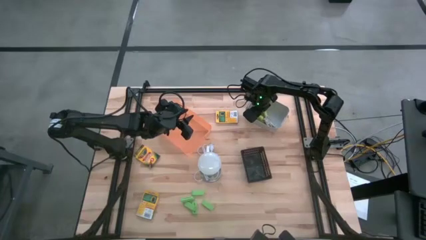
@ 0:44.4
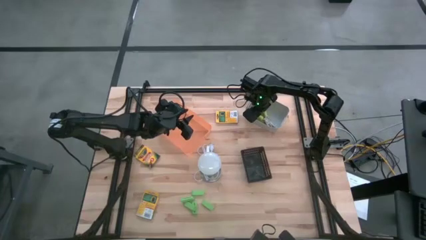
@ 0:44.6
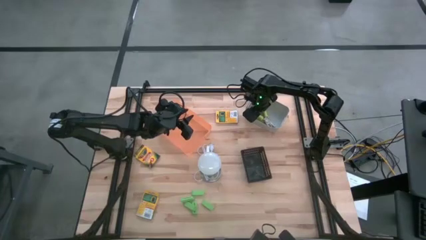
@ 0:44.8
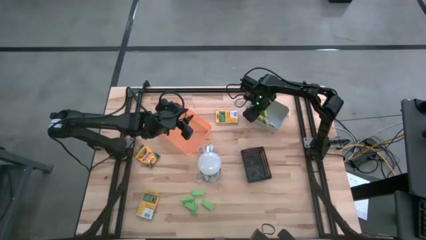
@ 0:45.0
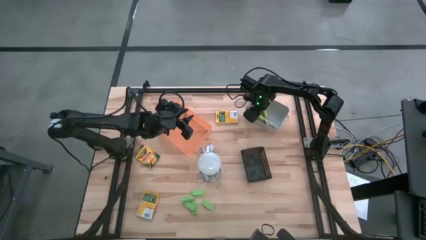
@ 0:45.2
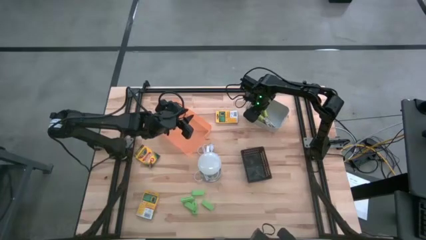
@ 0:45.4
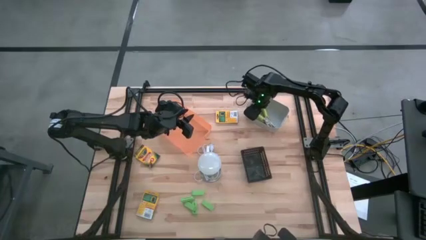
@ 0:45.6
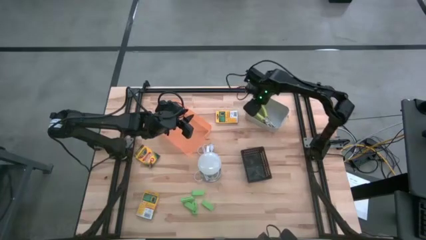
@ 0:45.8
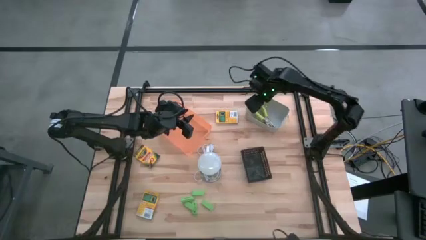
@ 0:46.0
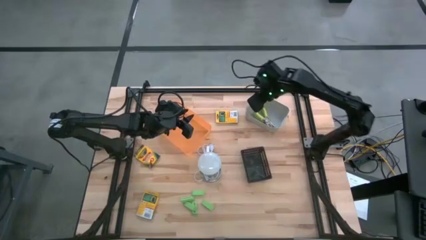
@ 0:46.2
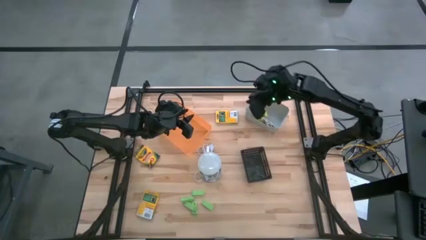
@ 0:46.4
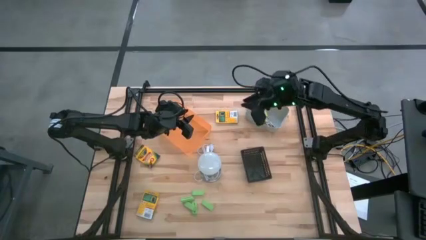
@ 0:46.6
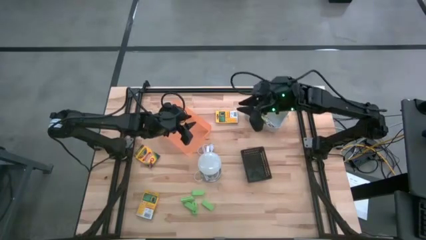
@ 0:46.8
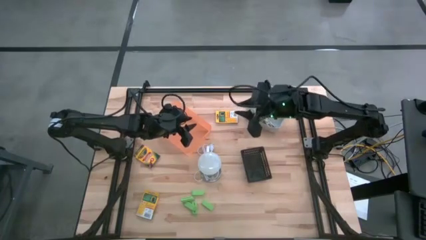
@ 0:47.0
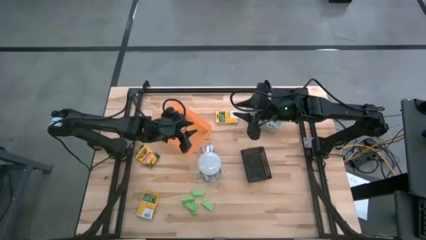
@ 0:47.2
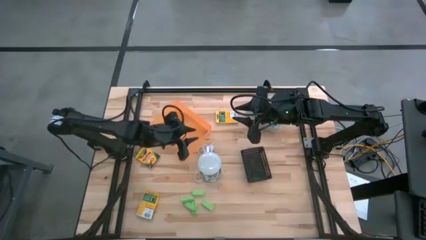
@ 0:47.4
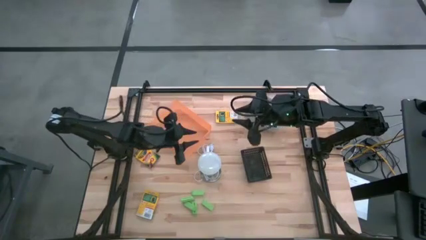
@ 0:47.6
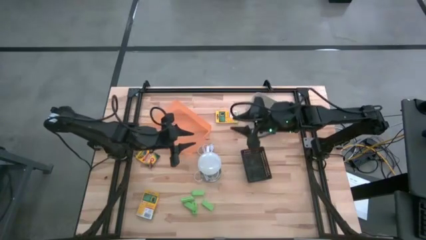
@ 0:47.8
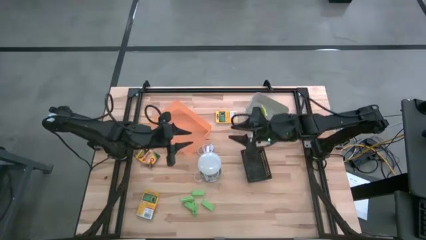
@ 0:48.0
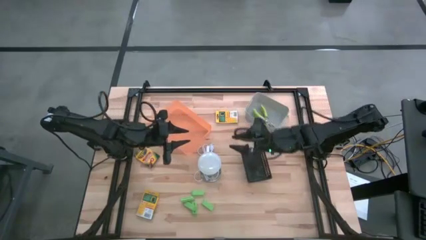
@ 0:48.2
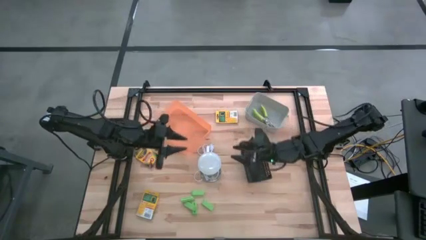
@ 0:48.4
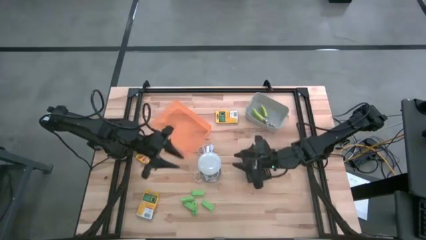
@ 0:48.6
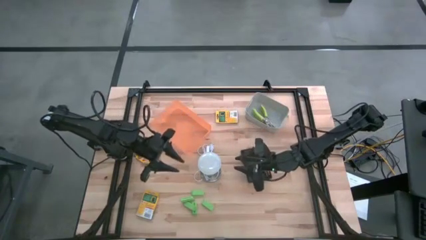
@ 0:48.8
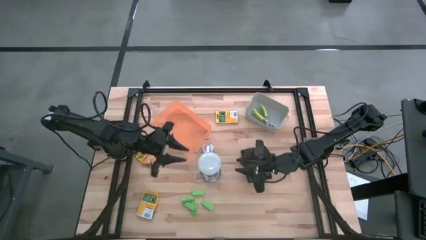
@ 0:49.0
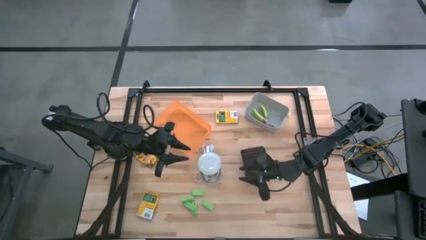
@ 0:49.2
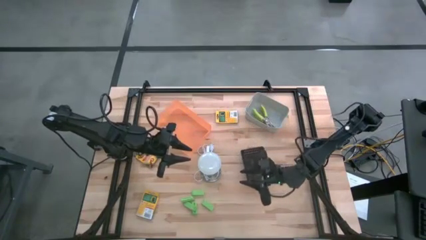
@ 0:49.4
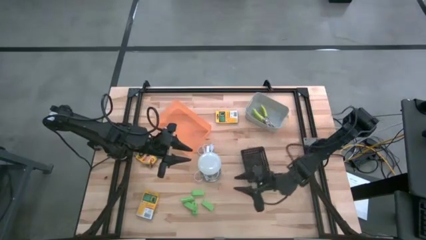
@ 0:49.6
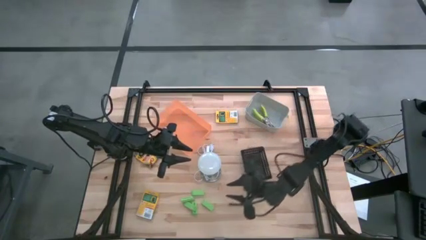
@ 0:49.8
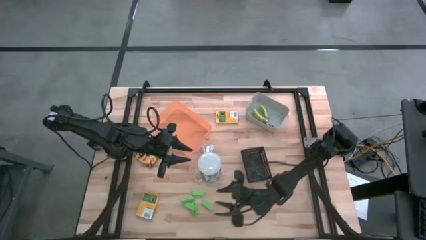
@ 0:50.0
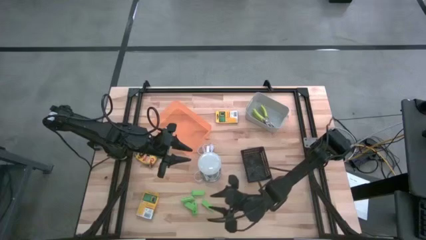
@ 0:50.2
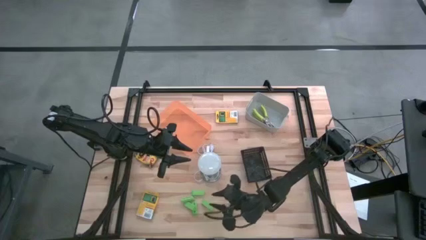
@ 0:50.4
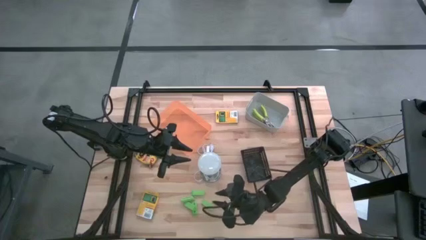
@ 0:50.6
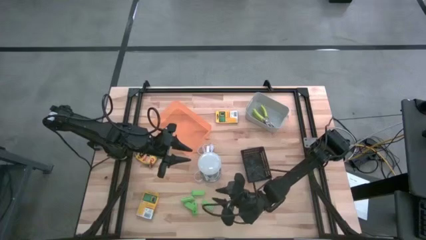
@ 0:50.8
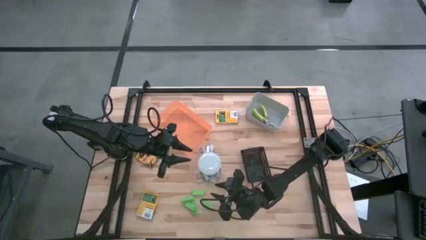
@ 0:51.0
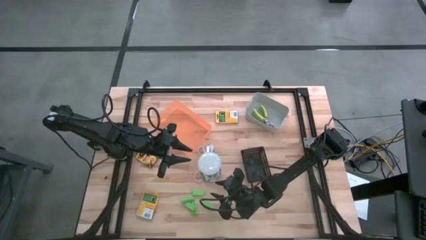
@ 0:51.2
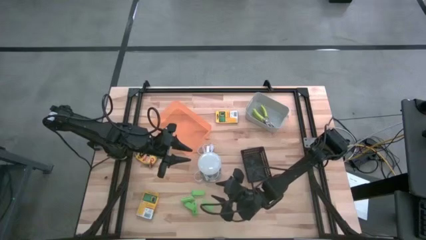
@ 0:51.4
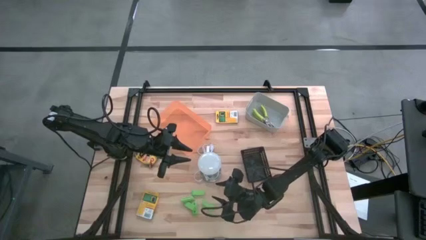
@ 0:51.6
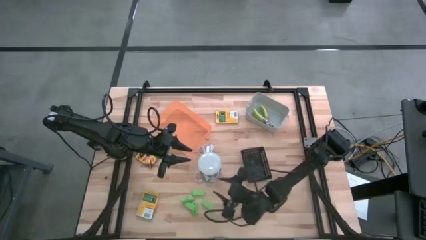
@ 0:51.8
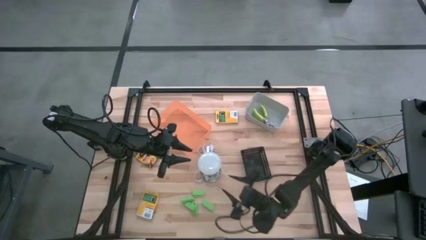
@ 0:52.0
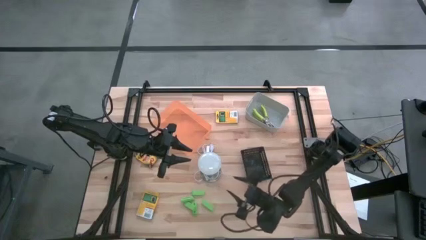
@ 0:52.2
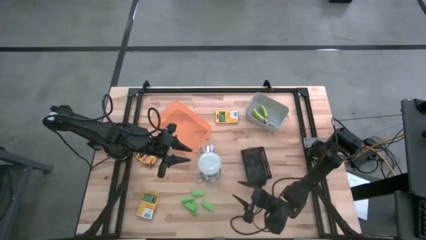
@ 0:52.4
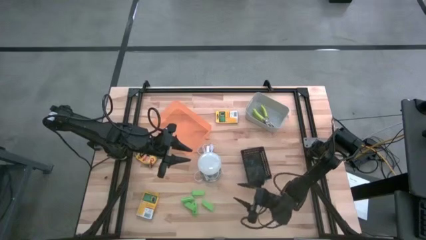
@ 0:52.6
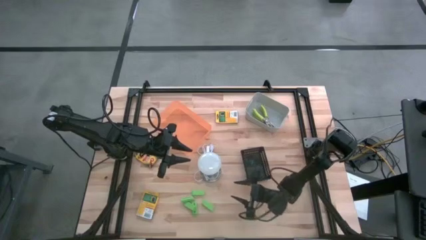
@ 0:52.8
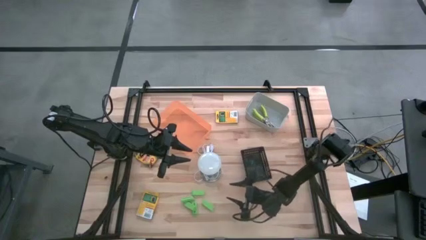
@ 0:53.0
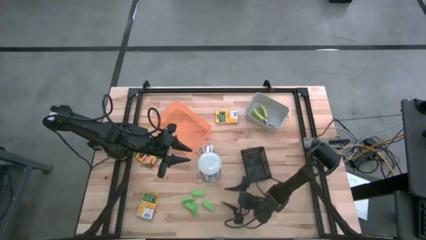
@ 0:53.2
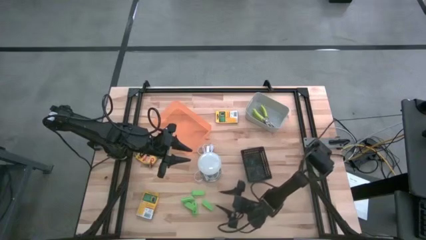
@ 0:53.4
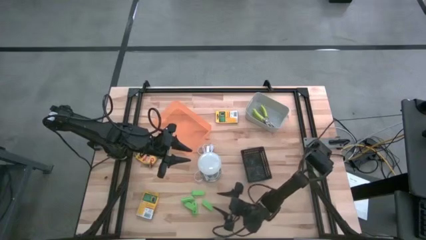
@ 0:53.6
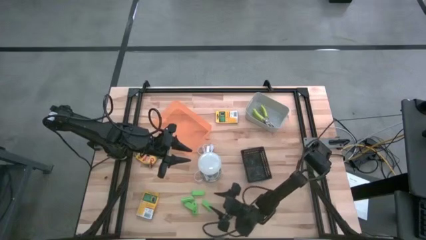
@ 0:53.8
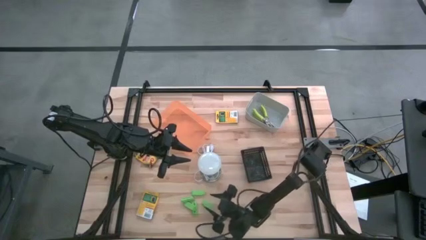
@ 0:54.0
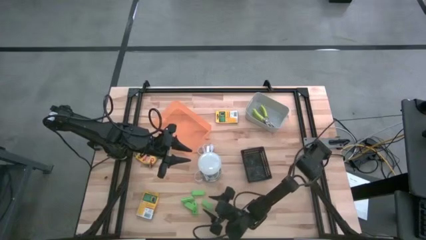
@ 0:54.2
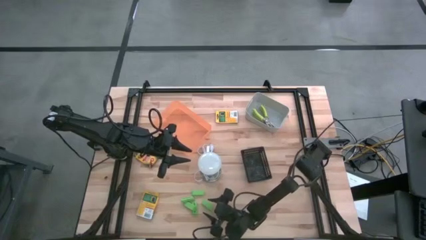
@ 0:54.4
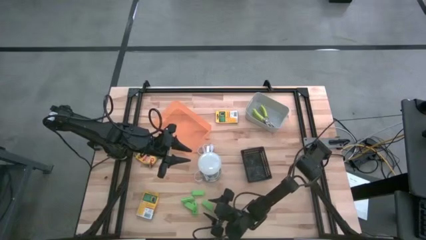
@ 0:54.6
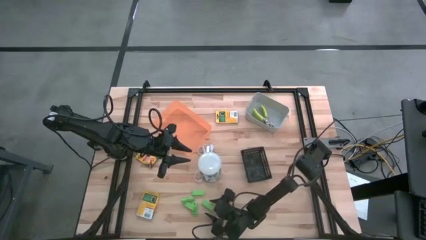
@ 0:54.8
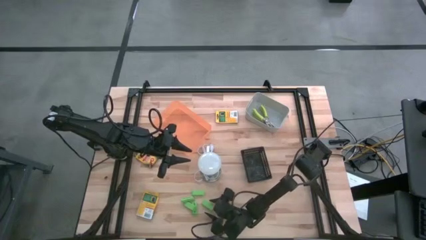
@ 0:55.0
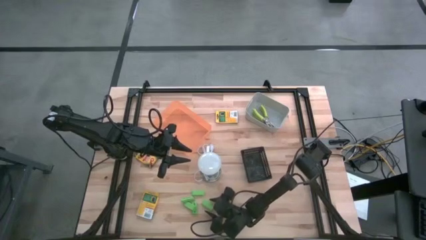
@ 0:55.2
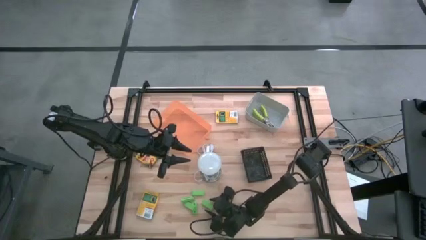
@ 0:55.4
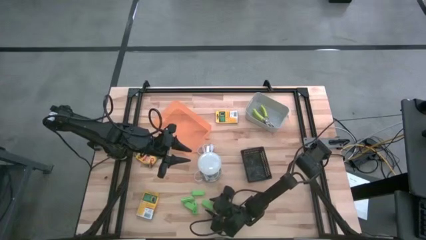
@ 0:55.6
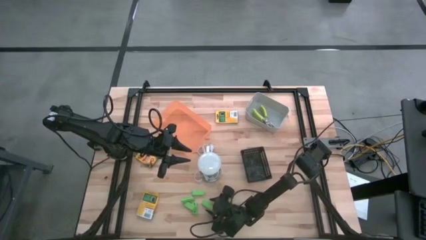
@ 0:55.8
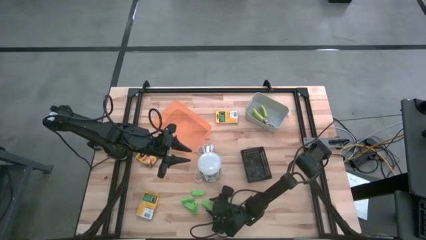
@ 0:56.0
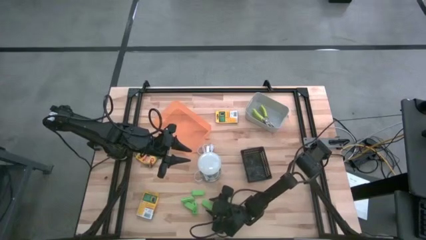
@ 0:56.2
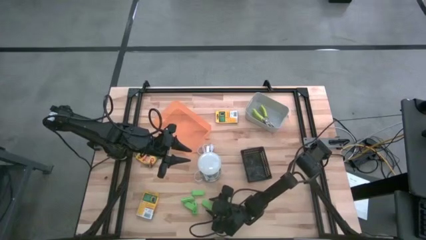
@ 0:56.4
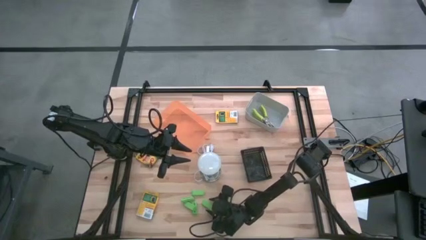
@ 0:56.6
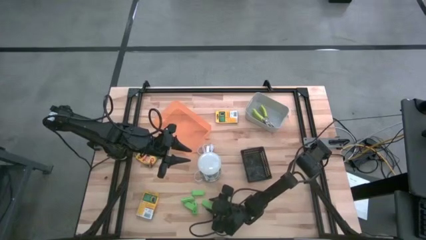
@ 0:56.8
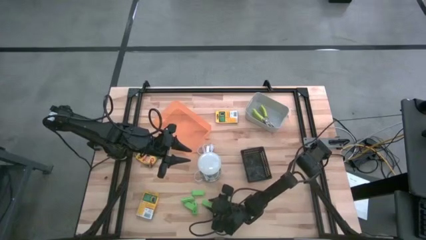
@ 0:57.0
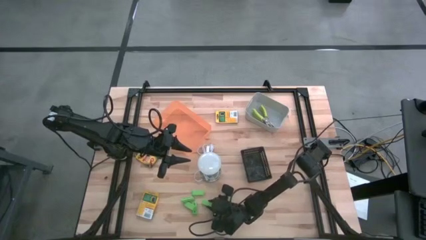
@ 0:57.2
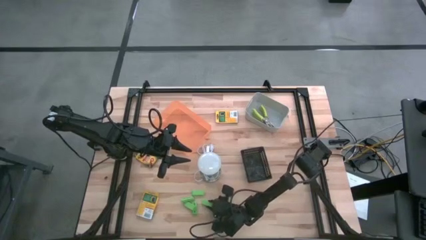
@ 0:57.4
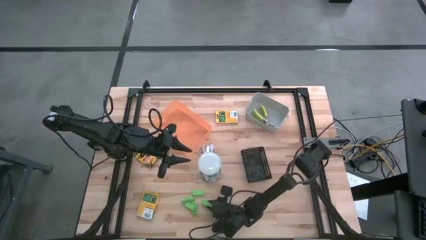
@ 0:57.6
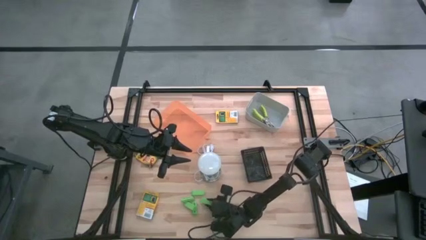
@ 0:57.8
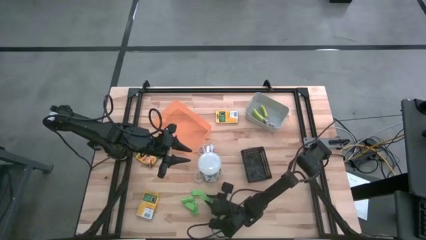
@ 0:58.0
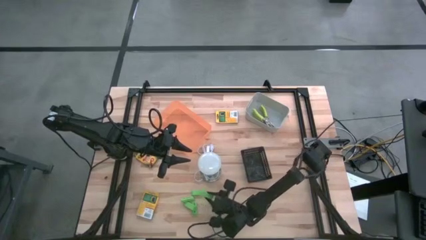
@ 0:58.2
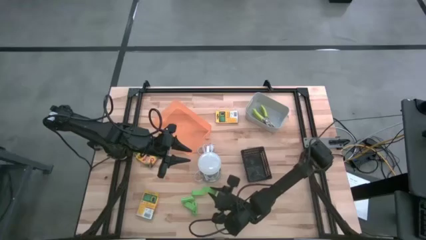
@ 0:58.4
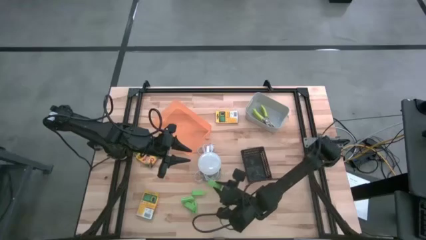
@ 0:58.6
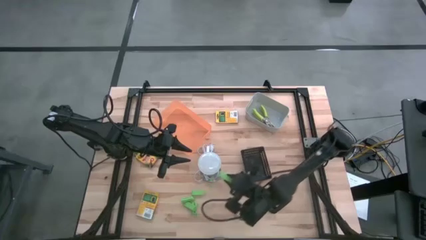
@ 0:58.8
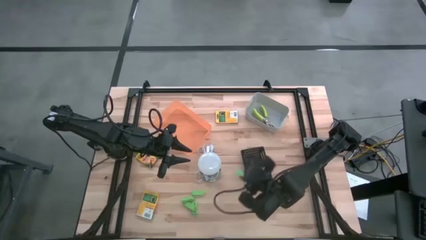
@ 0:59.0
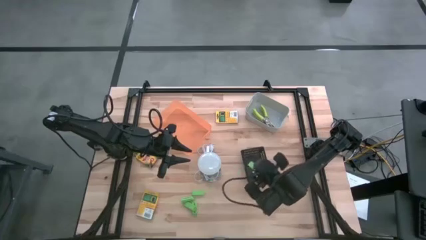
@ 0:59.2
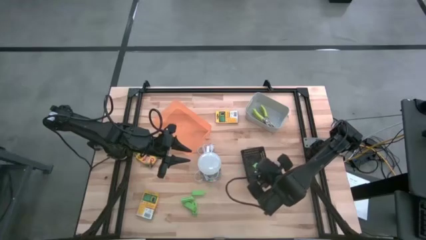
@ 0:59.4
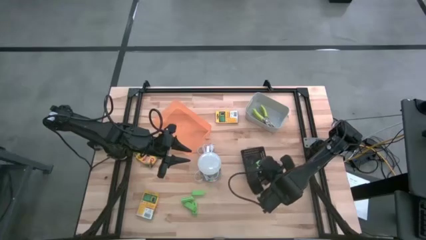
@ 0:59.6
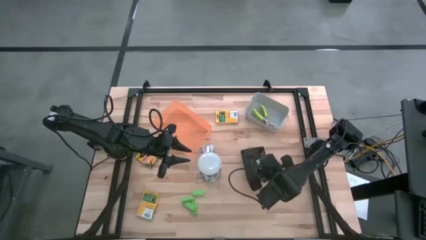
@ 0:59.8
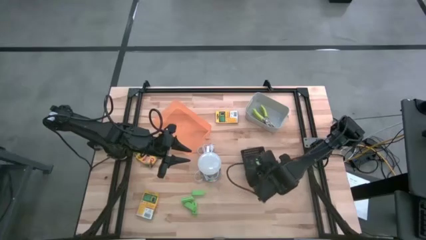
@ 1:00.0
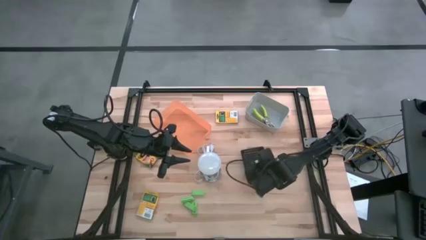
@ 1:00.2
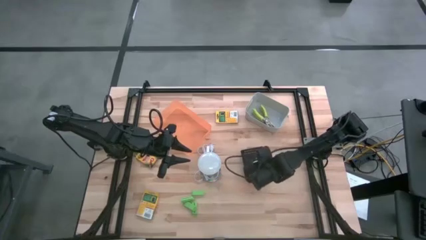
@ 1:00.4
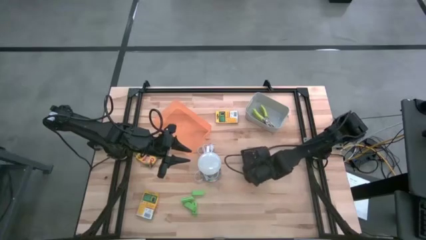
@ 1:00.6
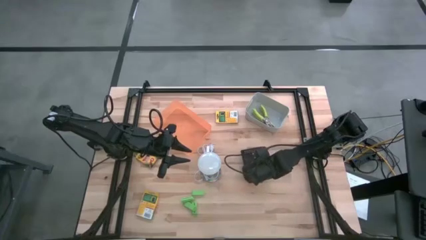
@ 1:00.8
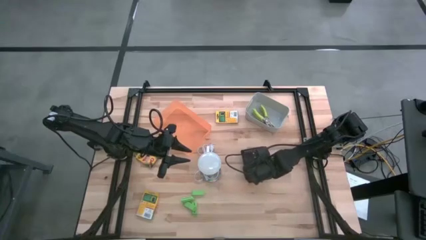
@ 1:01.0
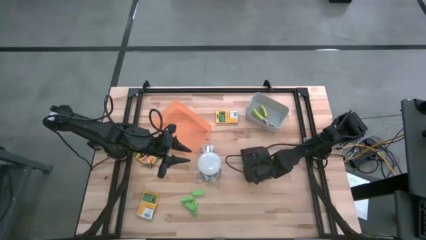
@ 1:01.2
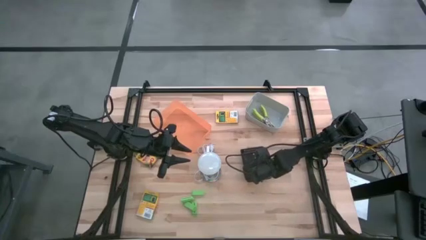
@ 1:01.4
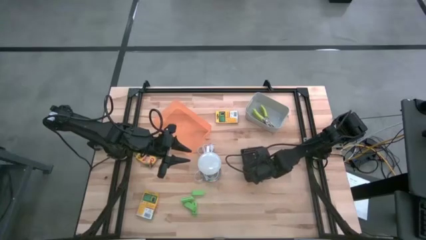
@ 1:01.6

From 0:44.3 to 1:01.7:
Task: Pick & Place School Supplies
Put the green eraser into the black bin
